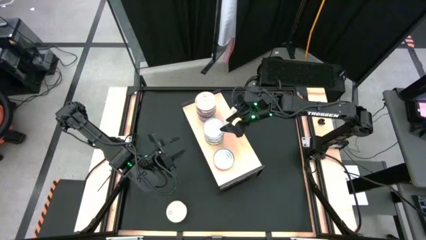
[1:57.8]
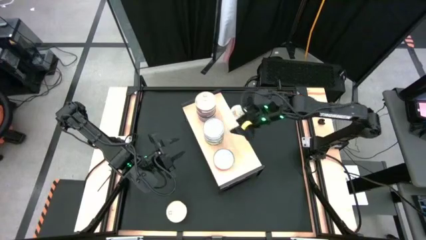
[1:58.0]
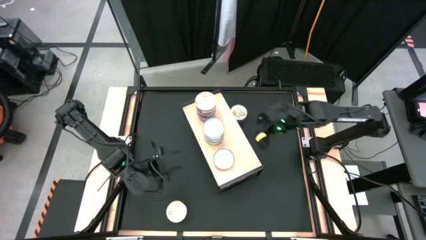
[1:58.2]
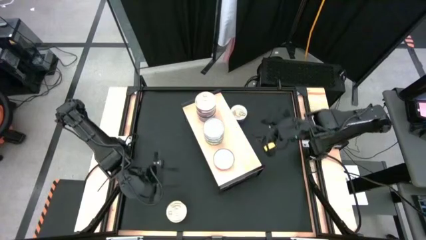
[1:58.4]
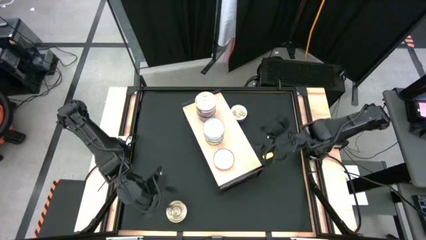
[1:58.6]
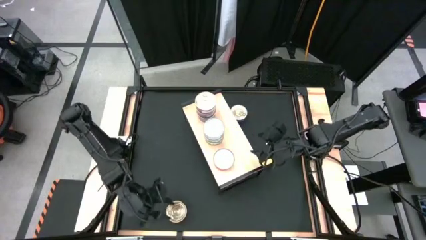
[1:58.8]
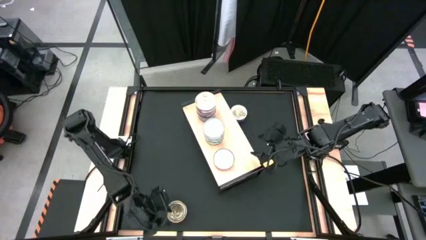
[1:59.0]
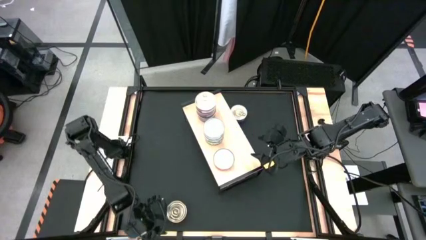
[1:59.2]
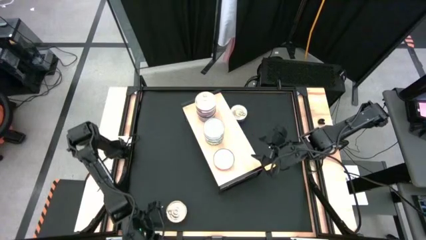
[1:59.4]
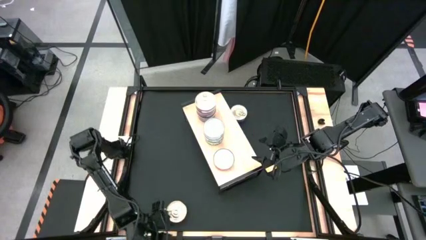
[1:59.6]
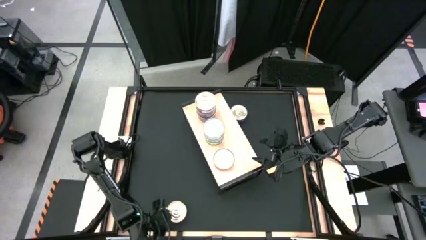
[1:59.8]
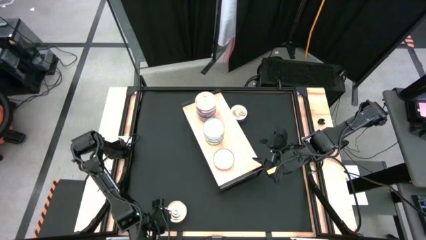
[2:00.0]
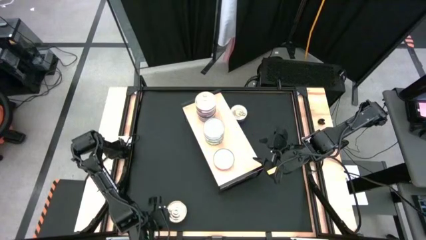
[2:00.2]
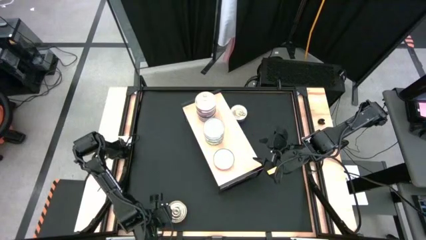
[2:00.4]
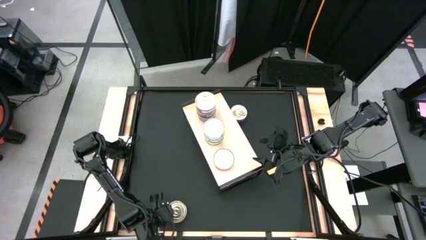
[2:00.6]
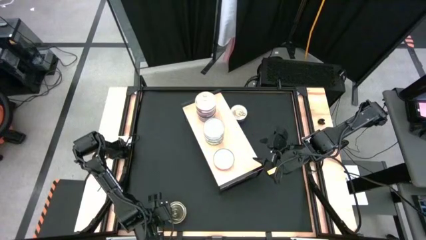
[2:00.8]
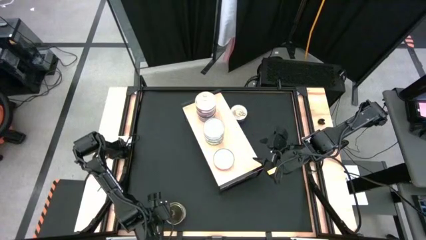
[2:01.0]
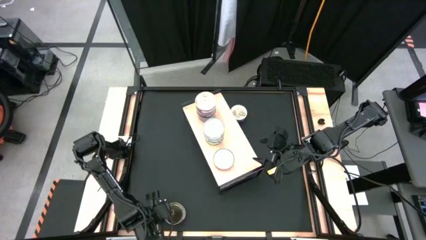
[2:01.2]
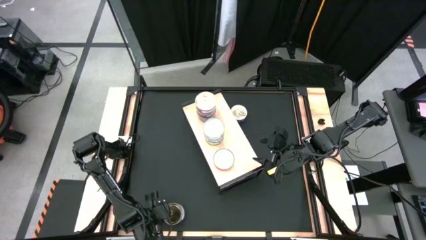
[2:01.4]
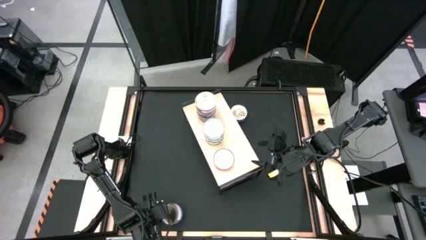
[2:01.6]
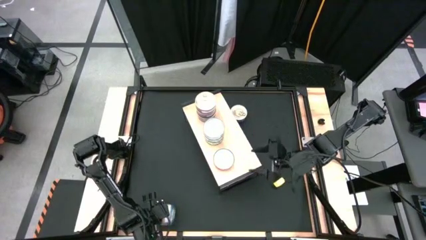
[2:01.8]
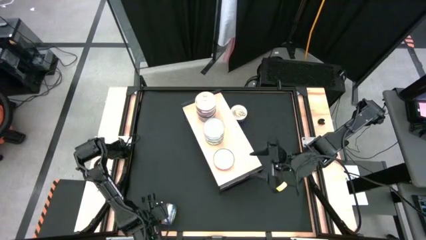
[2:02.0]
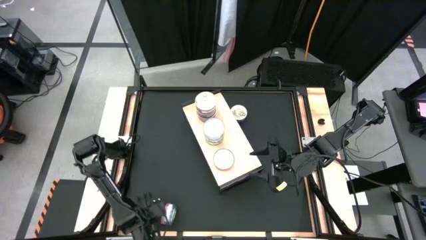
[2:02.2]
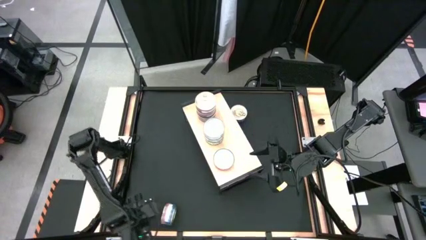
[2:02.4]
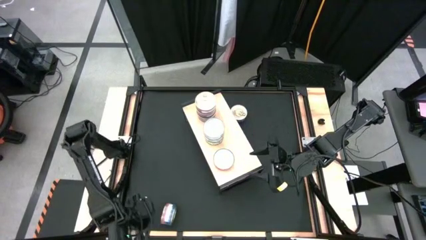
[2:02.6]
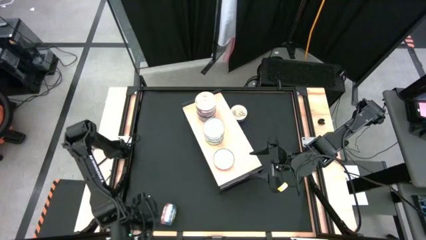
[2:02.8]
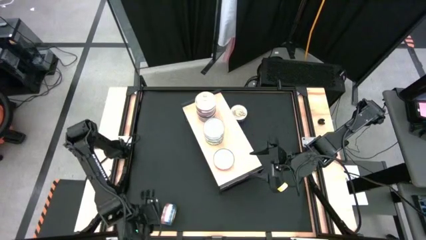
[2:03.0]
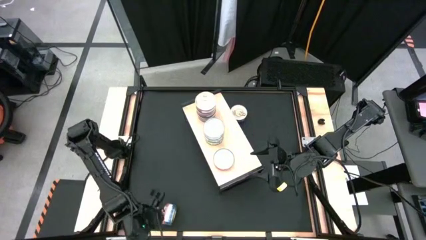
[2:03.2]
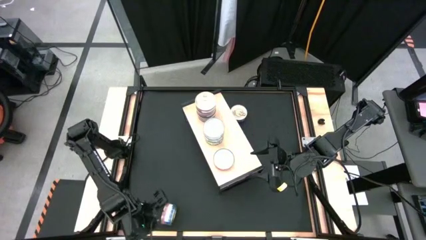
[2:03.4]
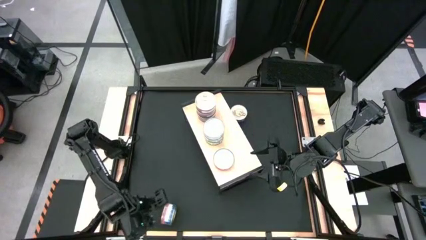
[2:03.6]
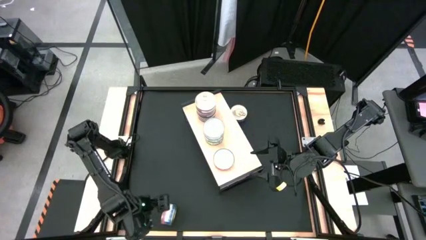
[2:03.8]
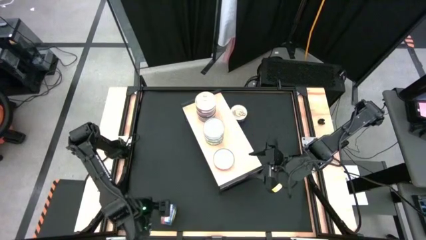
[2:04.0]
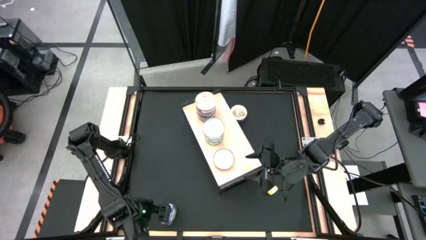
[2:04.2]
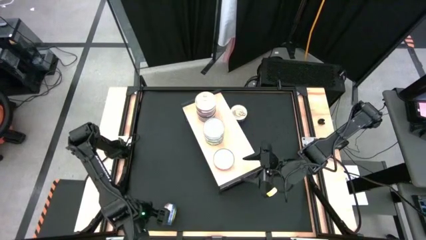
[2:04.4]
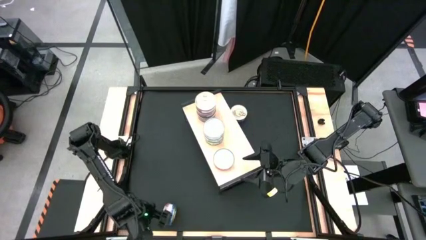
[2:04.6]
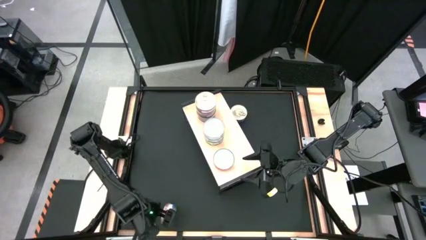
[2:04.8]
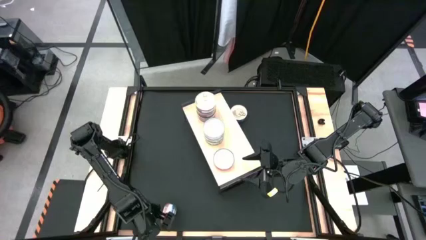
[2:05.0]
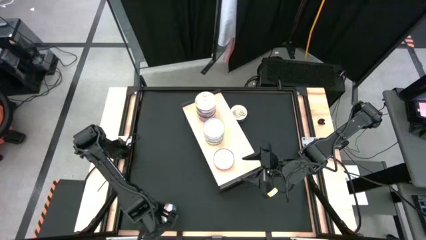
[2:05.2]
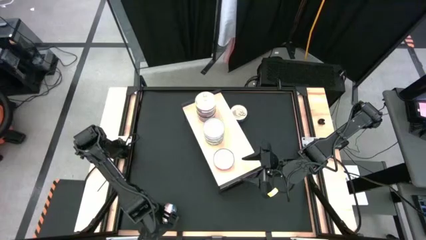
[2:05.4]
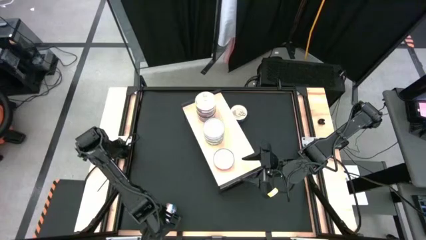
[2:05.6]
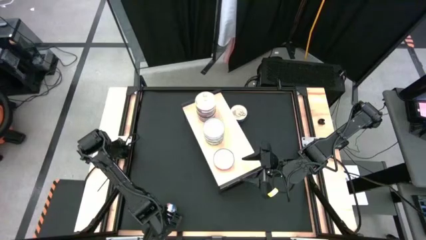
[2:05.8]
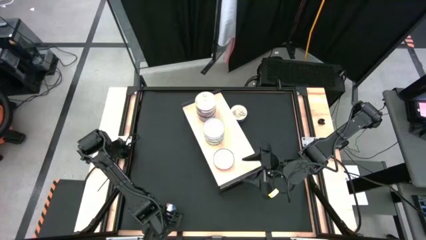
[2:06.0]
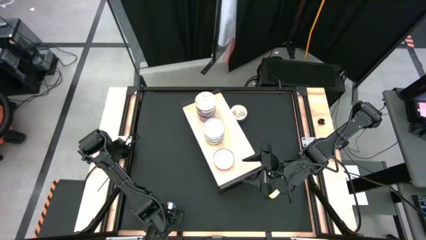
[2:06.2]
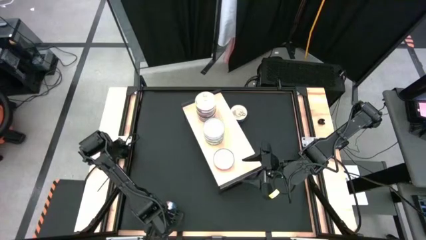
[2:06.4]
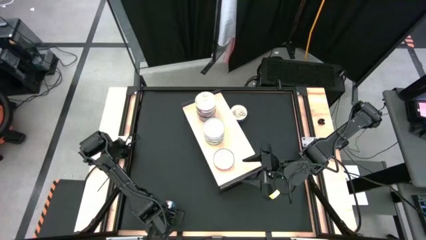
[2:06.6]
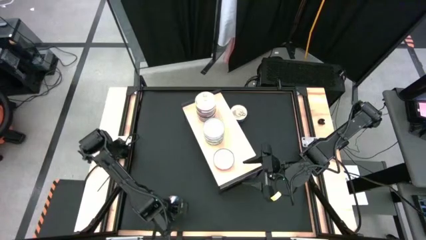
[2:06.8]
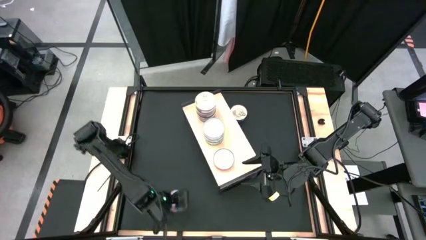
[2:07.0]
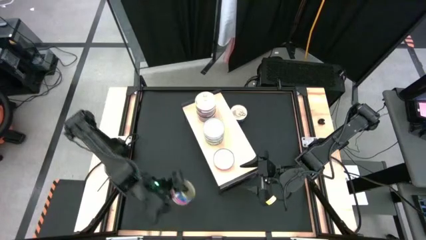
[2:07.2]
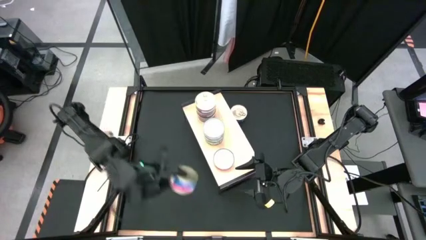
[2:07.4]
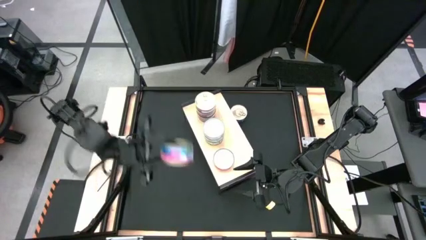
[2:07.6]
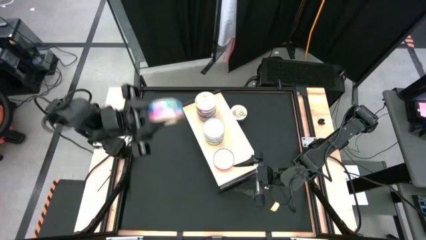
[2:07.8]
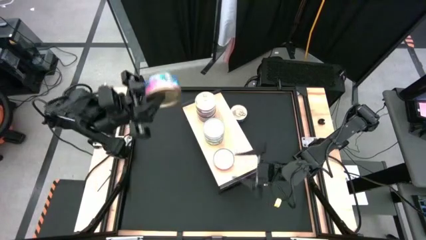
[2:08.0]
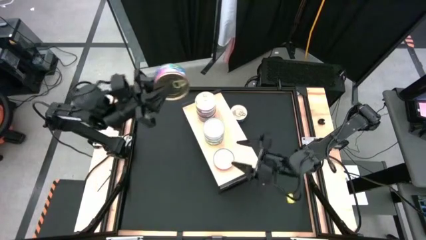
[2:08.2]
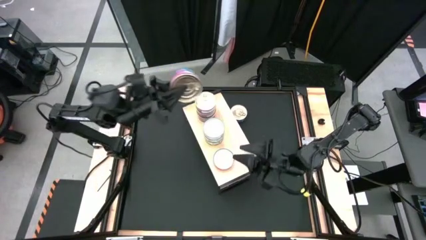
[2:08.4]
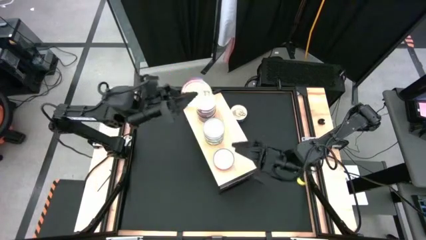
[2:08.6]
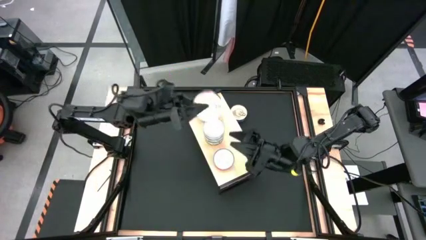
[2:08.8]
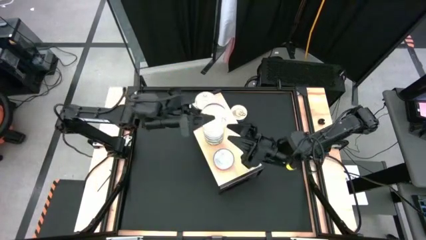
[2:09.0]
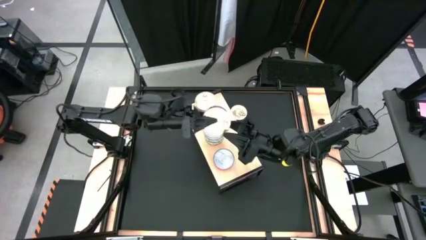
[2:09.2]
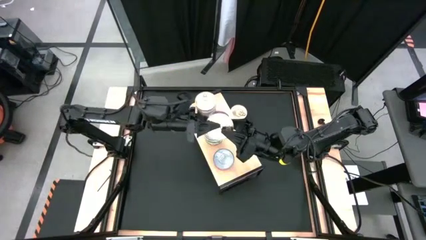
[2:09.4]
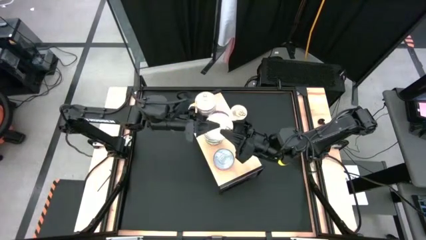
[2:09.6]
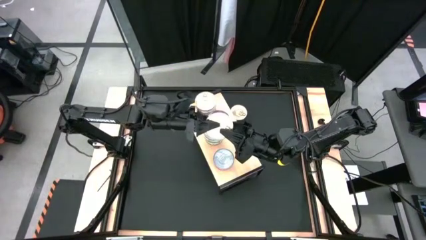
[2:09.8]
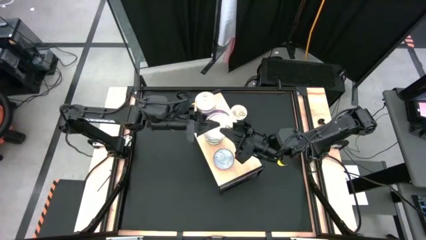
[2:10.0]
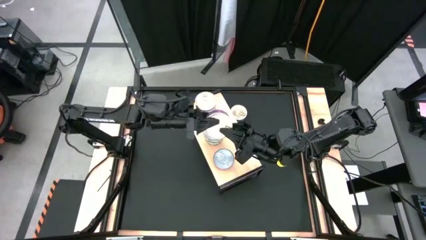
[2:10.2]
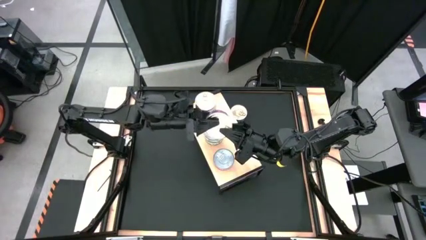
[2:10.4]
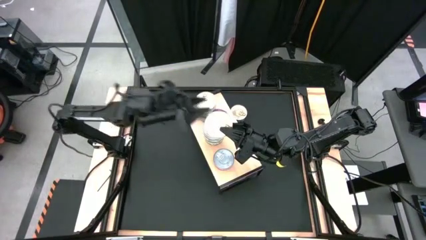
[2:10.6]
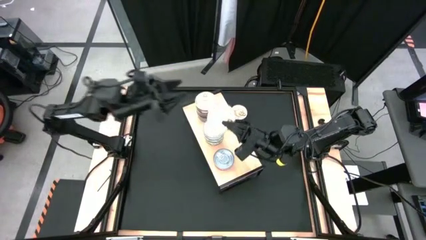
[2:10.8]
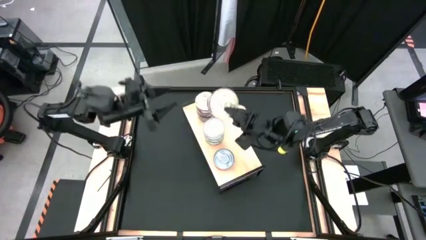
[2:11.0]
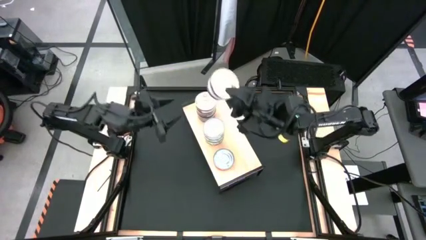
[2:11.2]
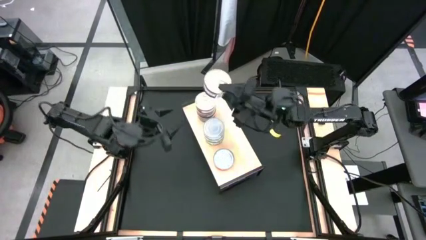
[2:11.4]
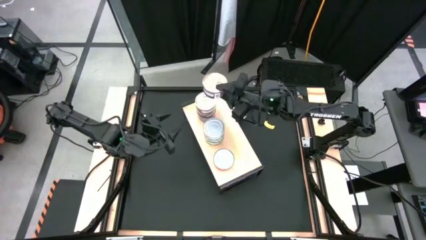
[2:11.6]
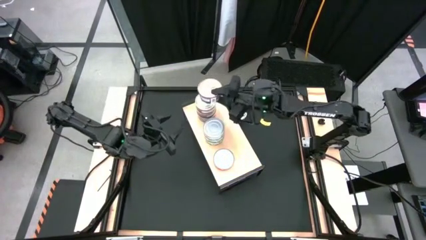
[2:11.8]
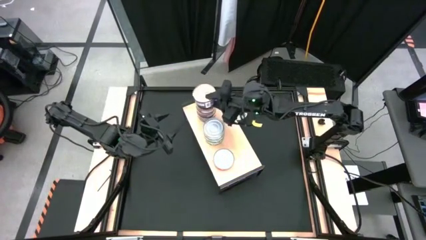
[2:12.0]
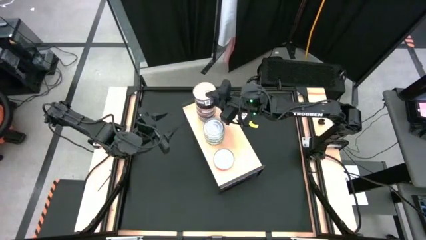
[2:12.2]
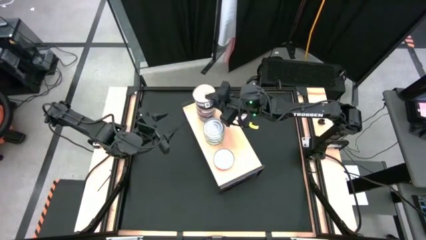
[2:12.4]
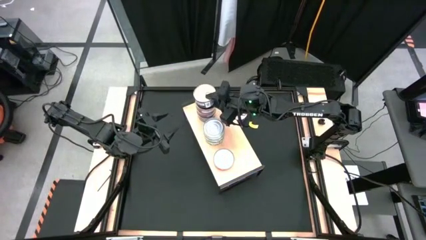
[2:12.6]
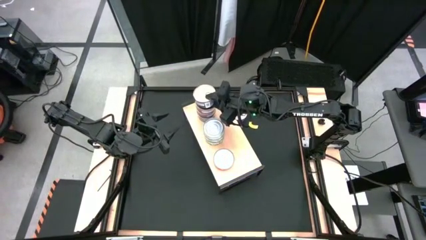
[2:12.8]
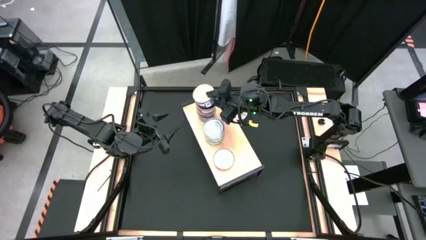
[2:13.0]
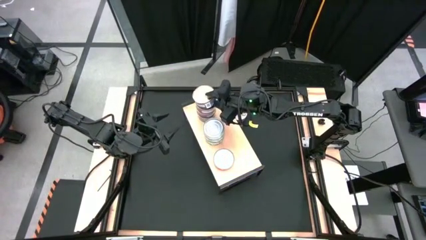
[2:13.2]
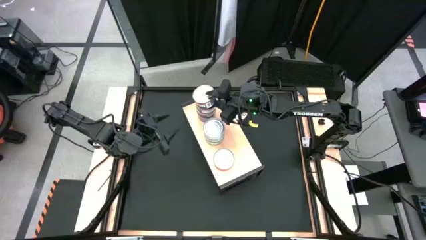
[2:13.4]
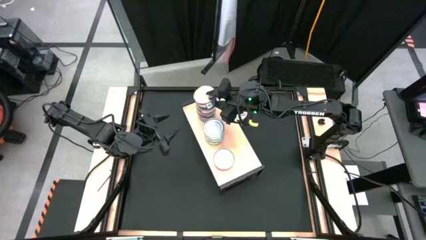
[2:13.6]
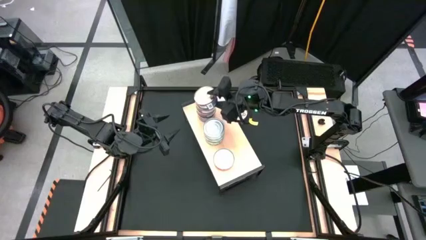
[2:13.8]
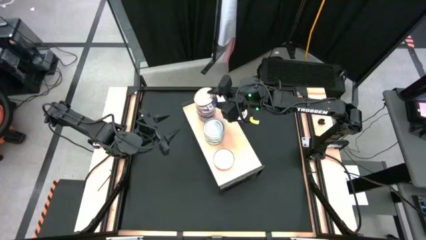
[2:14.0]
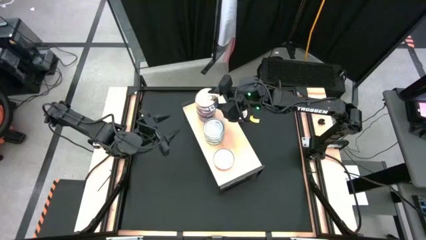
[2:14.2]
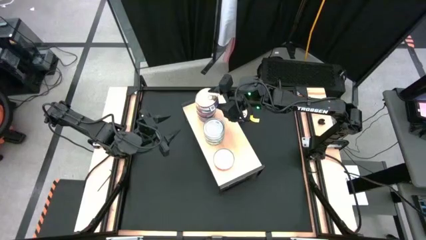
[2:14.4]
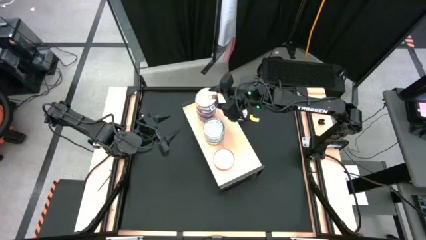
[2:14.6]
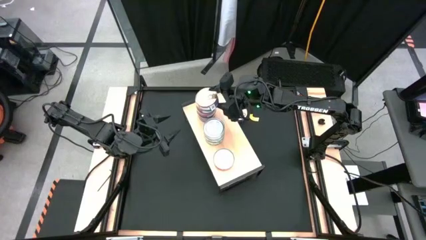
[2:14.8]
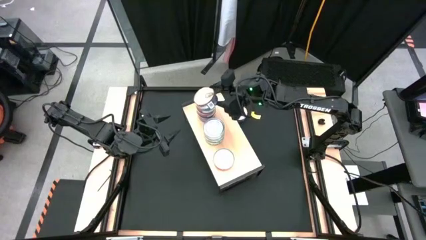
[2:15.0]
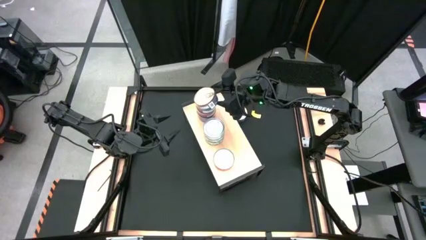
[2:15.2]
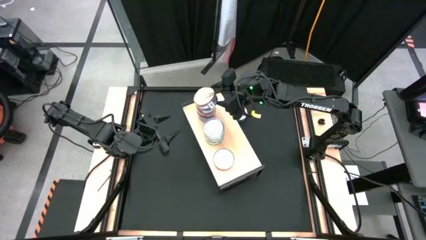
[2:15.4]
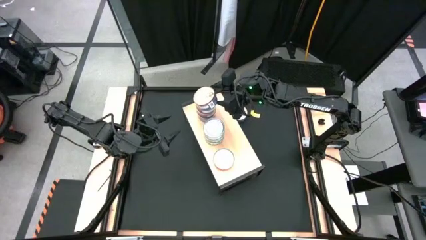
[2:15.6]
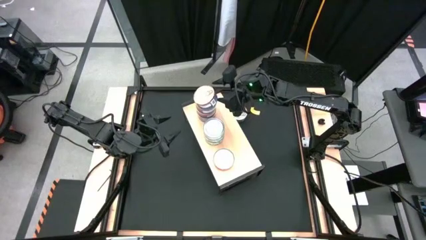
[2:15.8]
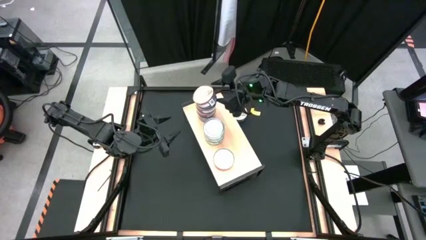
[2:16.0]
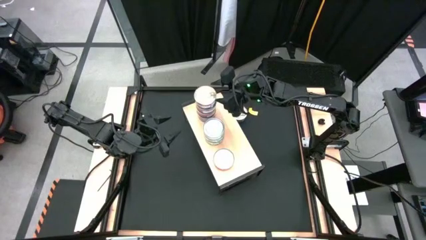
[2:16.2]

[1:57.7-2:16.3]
Task: Stack canned seafood by type on shelf
Stack the blue pink tuna can on top of the blue pink tuna cans on the shelf
